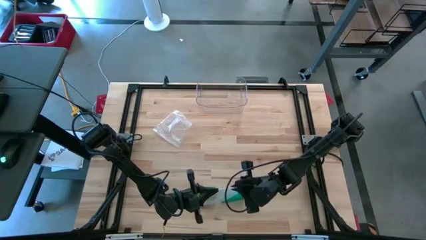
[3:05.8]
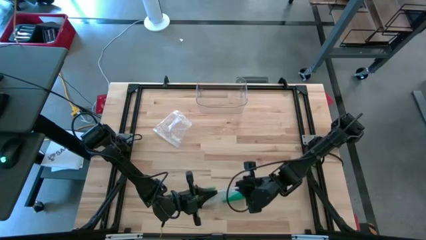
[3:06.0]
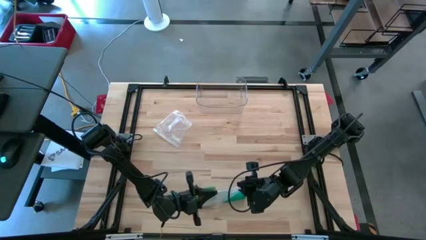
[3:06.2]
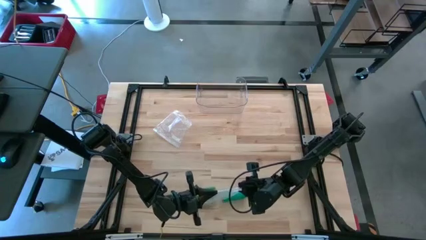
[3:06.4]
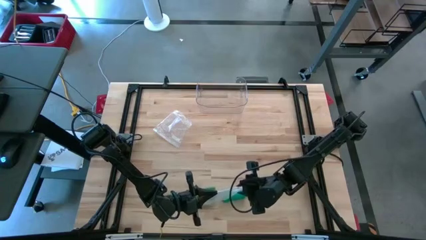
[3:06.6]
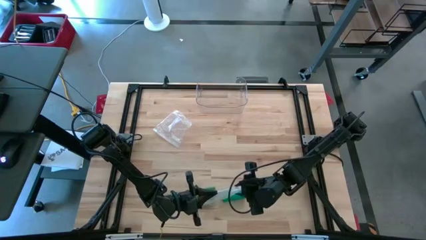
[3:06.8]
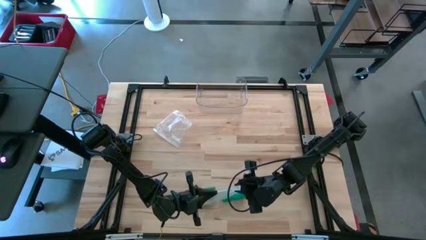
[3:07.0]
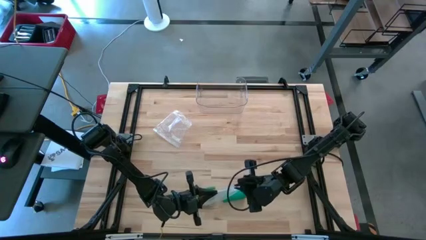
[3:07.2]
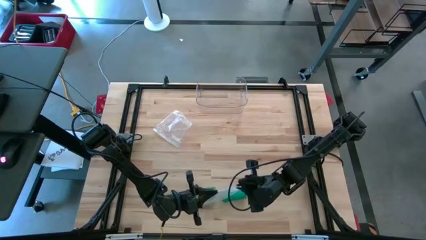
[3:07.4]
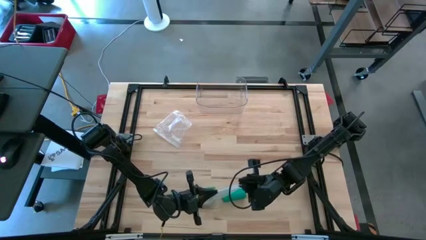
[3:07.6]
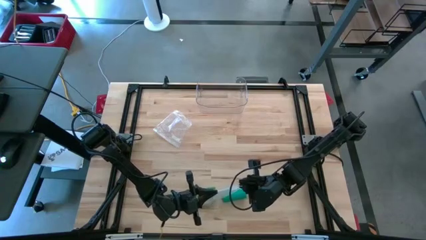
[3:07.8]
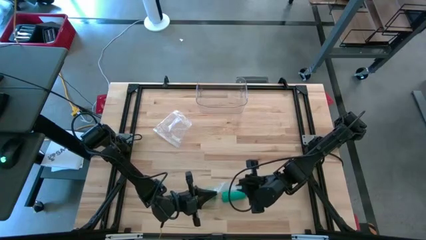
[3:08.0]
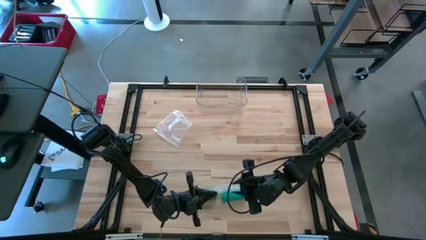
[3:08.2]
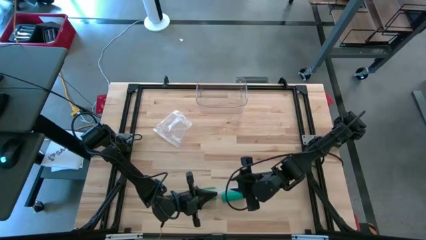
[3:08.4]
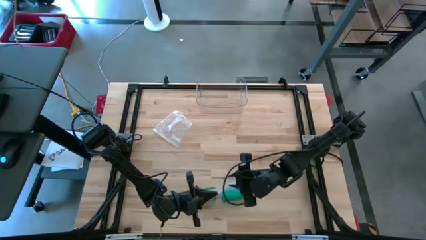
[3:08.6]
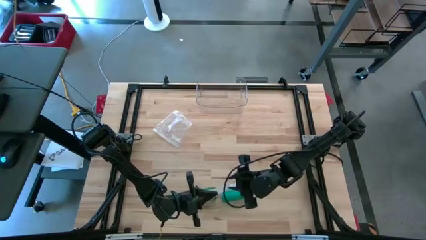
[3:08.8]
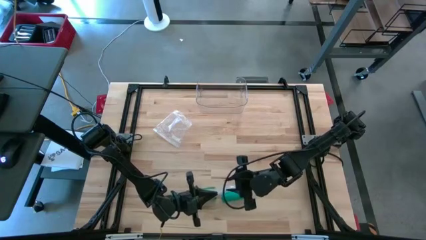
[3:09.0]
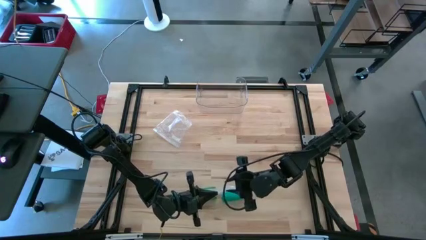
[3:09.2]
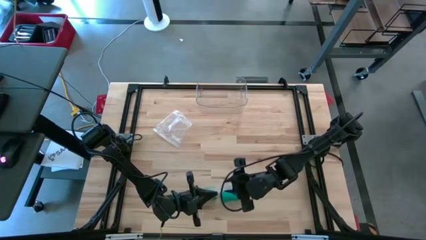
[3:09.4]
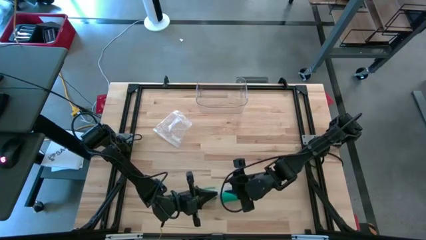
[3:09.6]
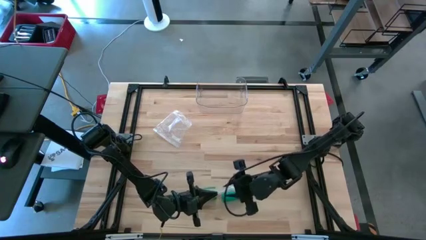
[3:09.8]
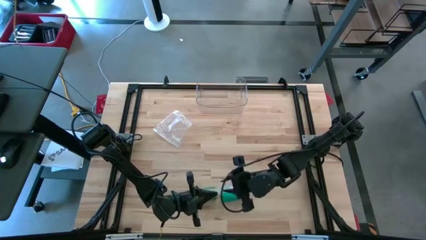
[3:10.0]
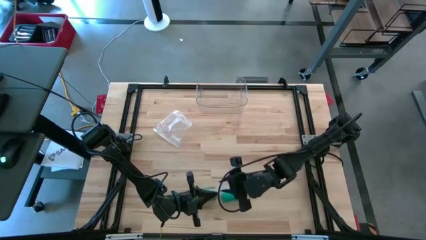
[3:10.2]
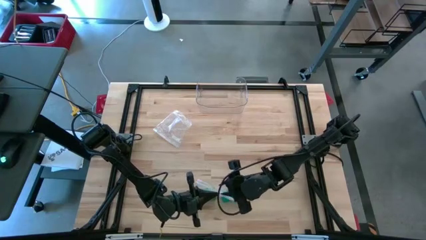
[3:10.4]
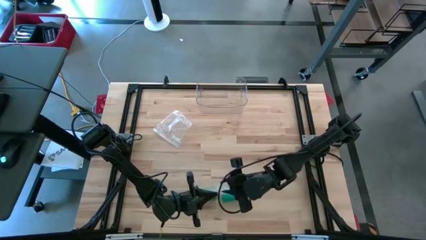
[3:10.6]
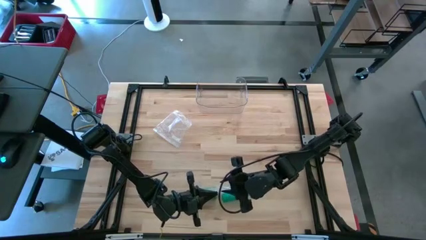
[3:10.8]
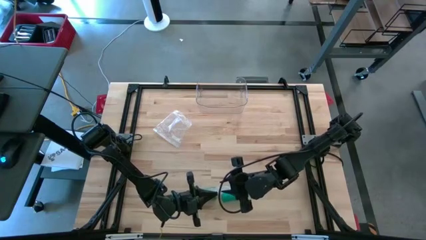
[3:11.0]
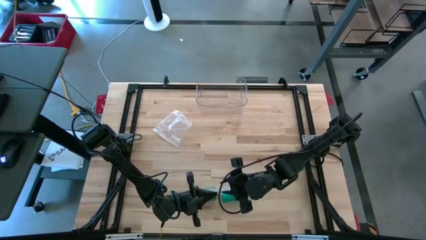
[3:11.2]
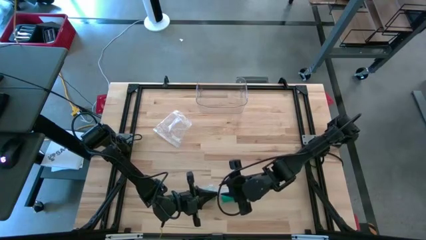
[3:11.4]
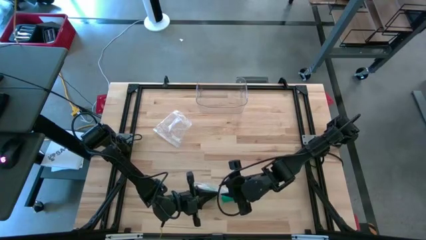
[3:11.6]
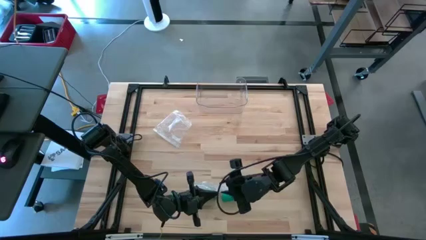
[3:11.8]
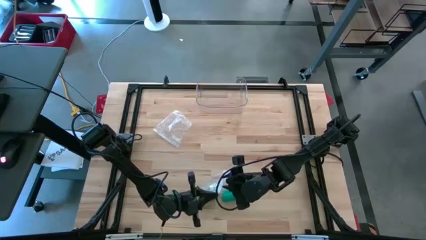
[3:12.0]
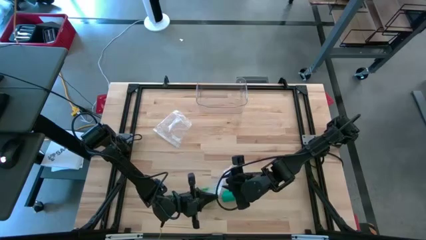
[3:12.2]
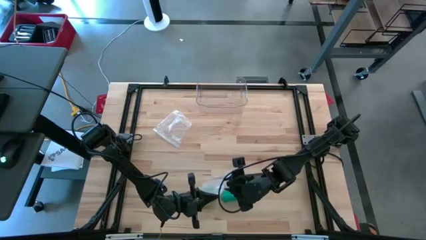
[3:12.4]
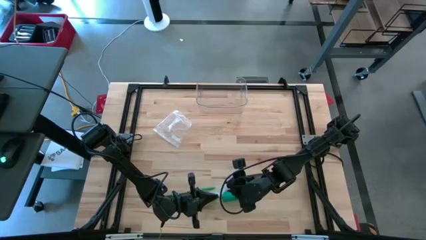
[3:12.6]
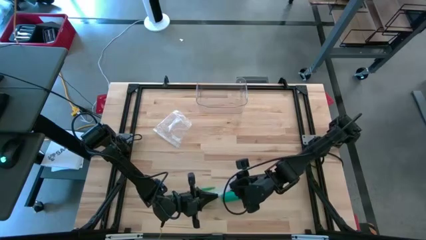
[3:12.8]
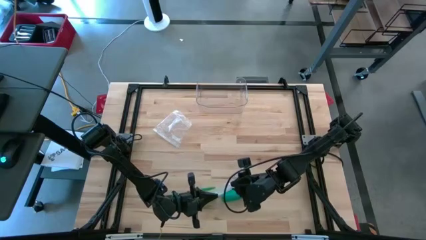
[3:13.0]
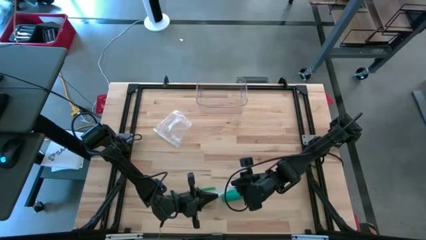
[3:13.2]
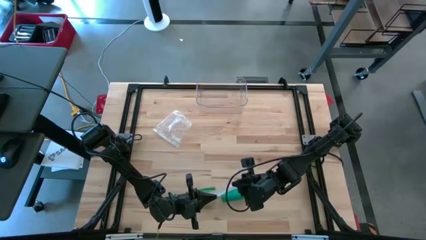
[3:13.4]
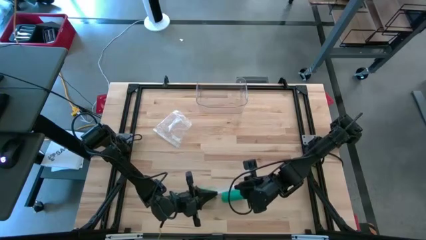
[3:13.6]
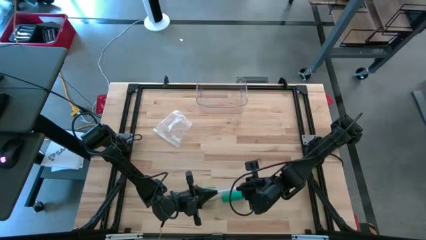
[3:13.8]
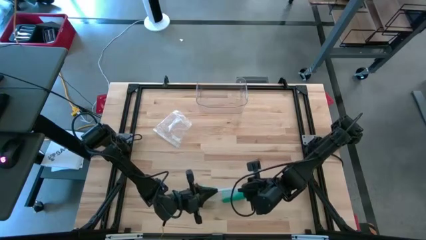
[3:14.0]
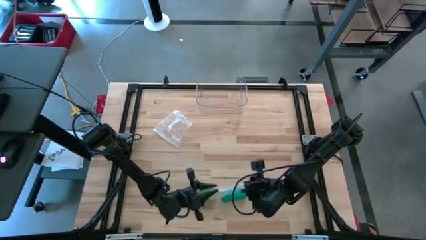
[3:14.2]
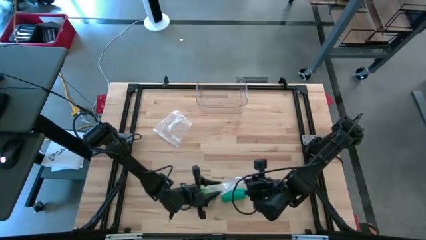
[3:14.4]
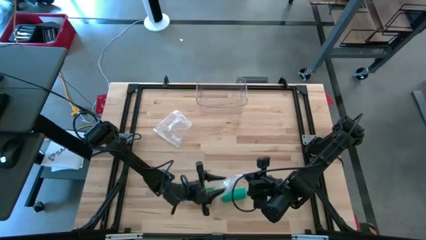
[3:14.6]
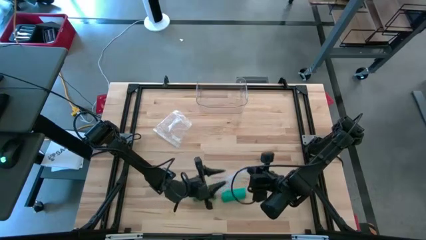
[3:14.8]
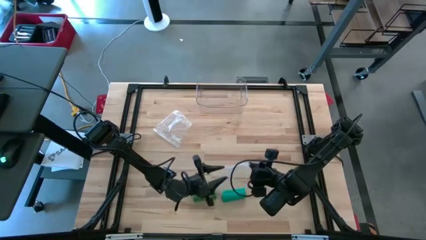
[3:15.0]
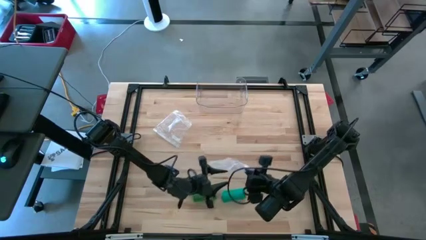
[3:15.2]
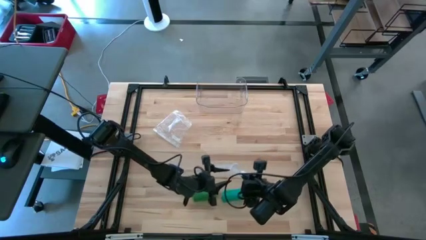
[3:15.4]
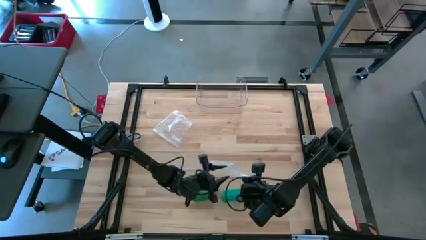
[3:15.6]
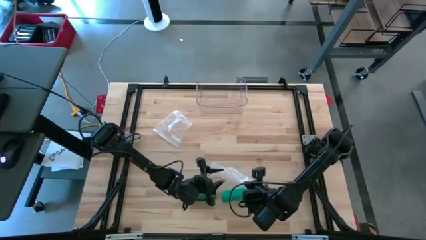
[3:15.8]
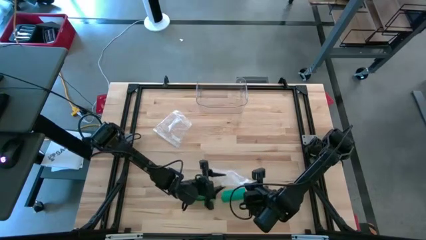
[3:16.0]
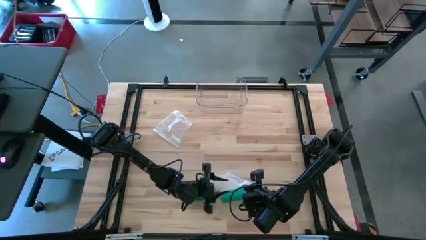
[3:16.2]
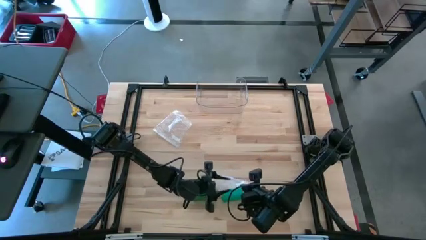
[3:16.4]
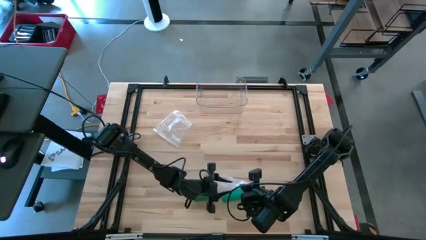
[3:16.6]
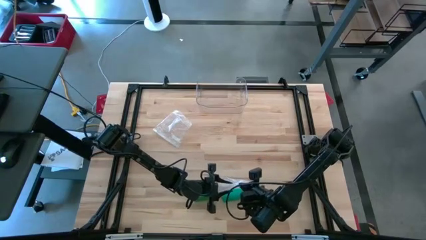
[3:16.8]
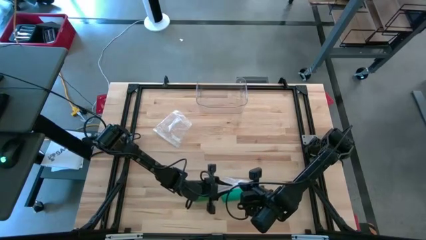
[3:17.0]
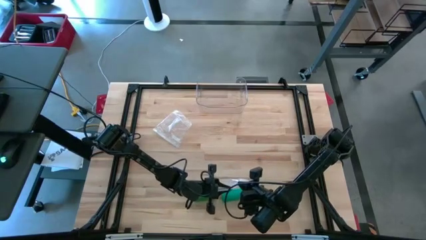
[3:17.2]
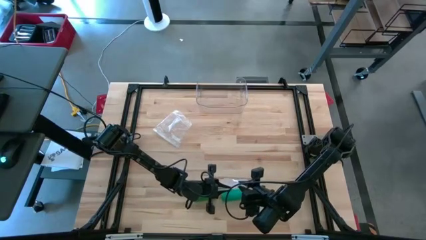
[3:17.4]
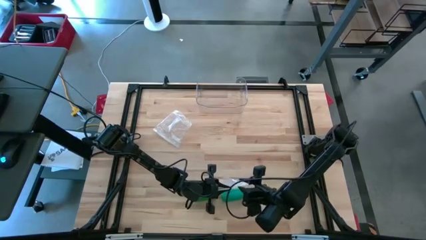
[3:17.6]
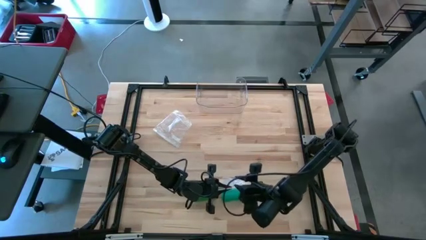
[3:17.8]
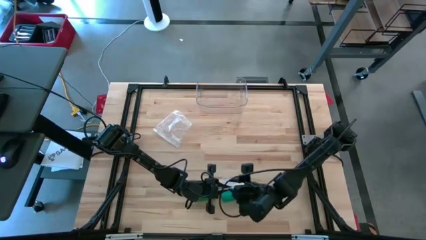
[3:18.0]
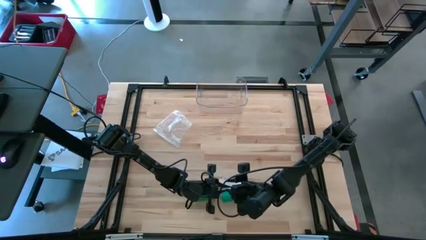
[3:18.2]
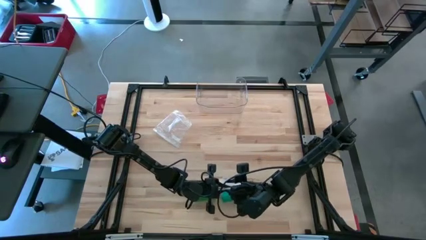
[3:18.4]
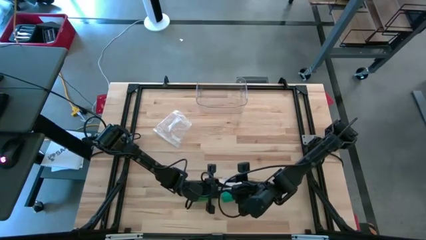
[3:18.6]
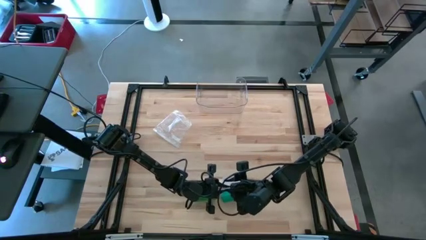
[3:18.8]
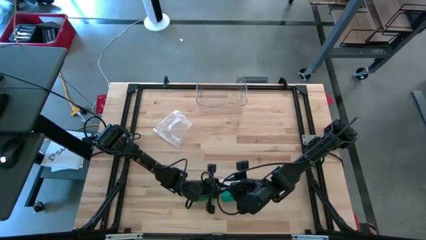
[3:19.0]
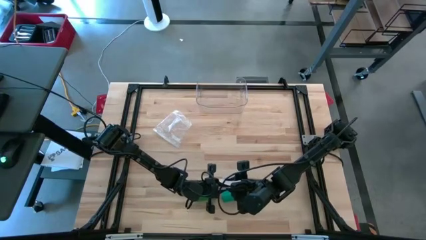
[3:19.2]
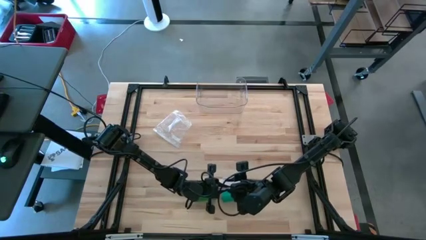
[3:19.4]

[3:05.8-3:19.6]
Task: Roll bandage
Open the right transparent zip bag
